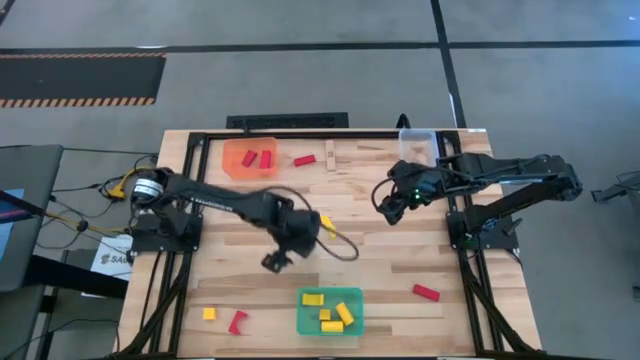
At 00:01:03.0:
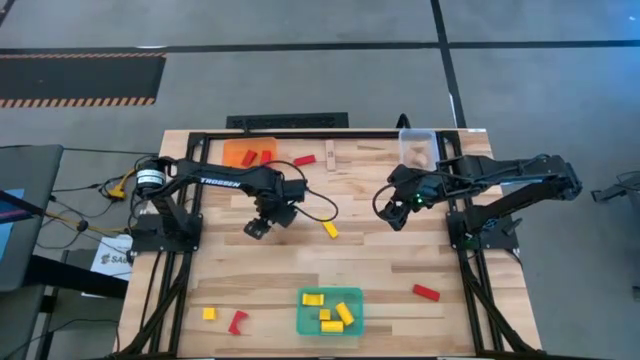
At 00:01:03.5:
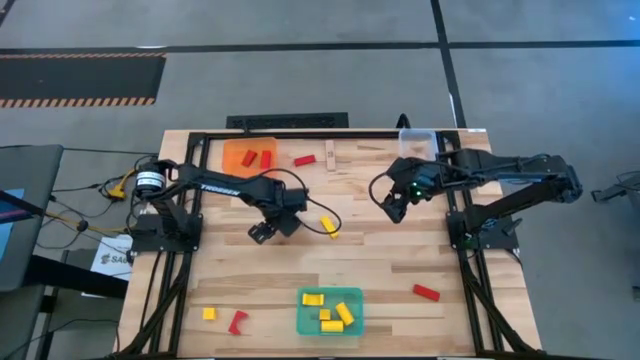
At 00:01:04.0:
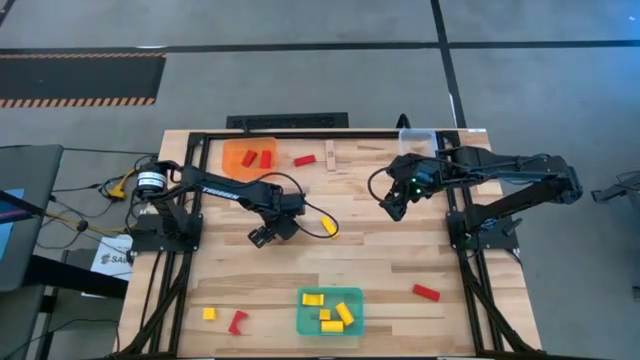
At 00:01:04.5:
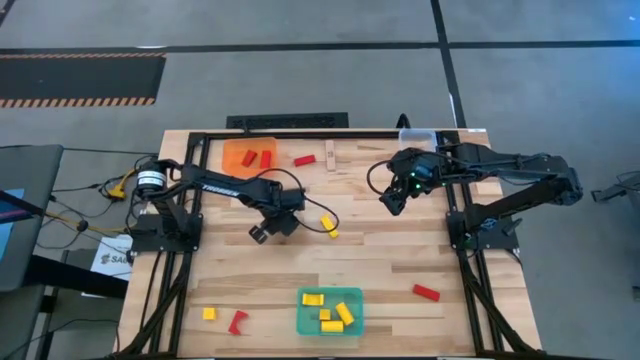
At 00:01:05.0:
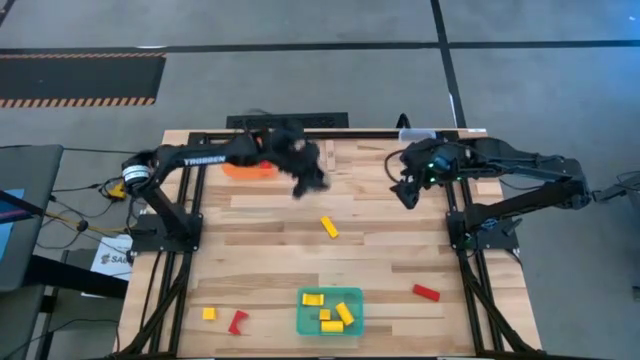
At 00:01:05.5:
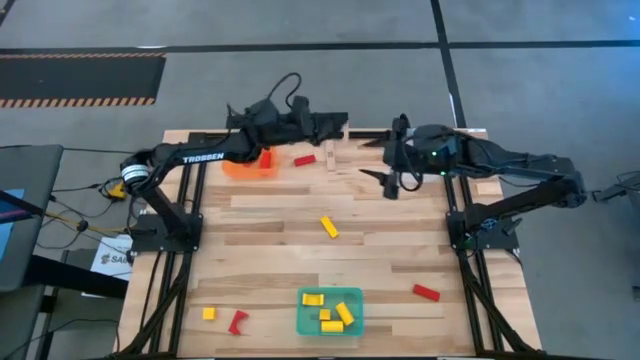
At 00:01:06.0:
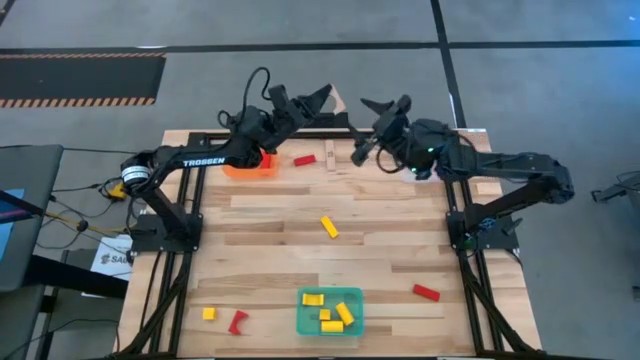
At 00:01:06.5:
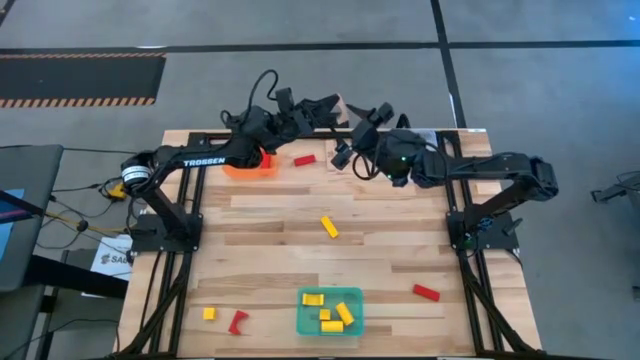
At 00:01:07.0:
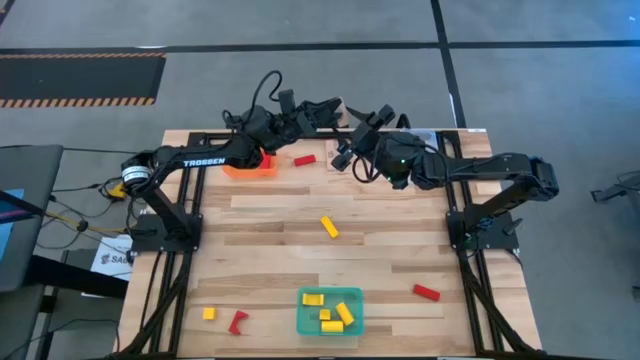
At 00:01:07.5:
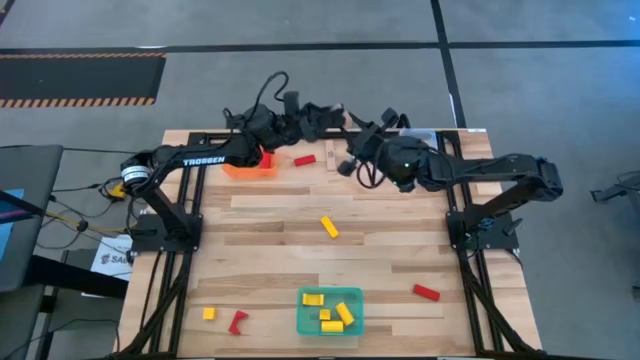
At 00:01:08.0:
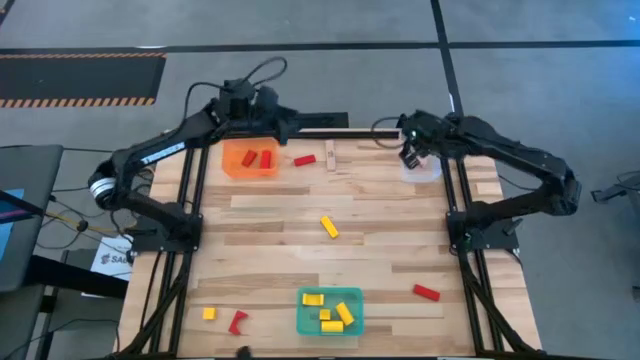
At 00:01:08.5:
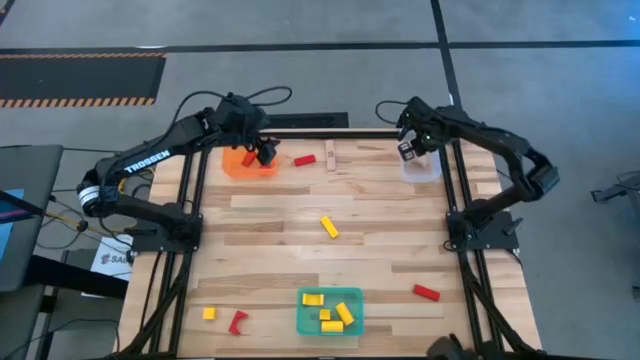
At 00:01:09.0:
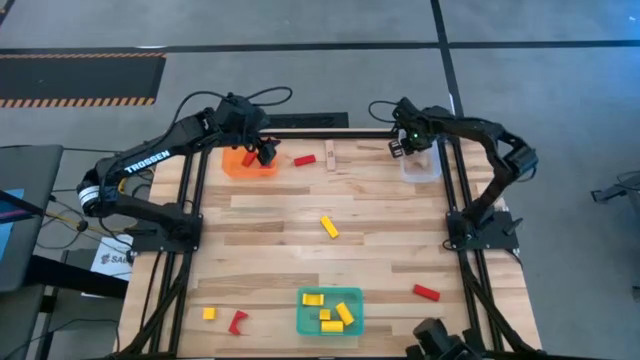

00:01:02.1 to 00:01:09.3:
Task: Sort & place blocks by color
Put the brown block into the transparent bin

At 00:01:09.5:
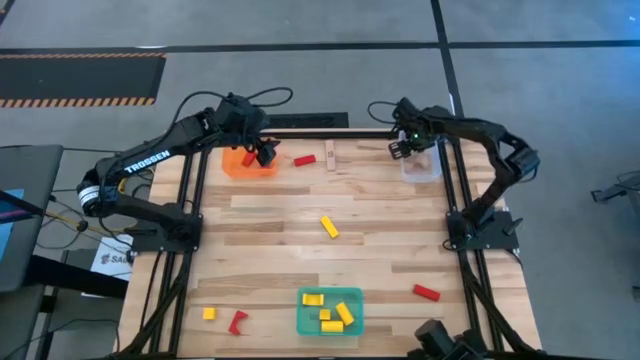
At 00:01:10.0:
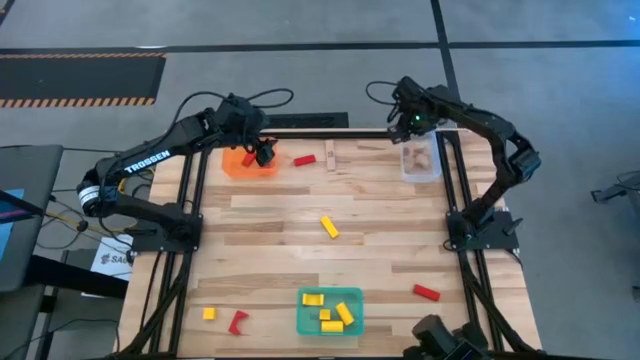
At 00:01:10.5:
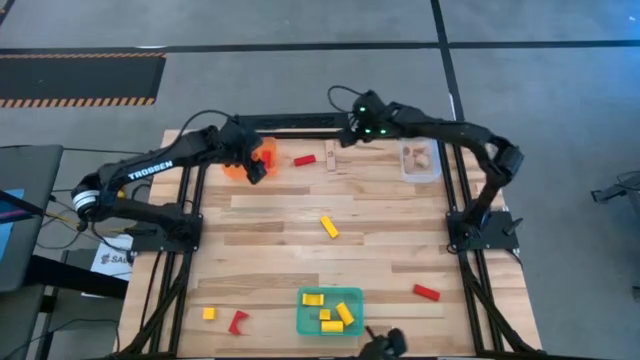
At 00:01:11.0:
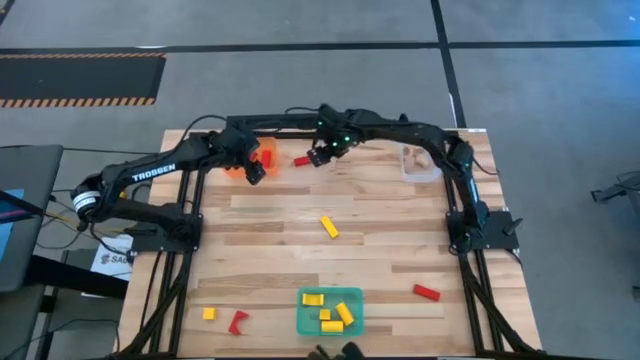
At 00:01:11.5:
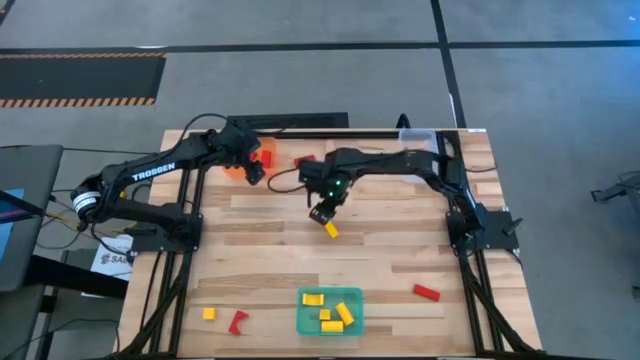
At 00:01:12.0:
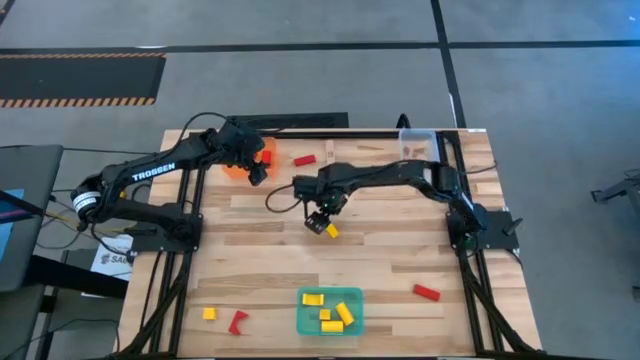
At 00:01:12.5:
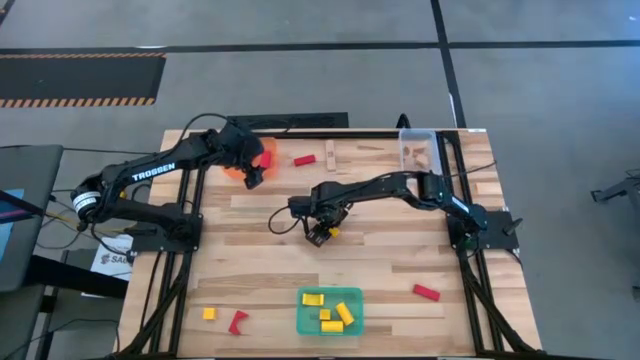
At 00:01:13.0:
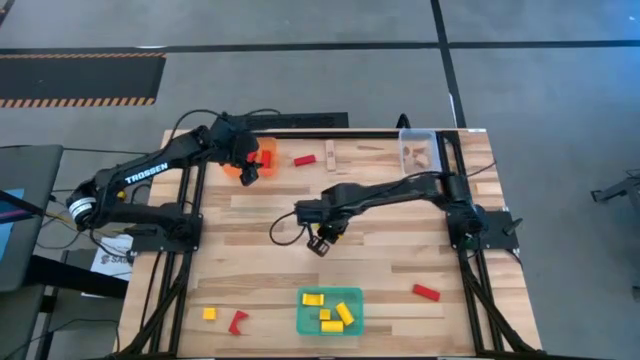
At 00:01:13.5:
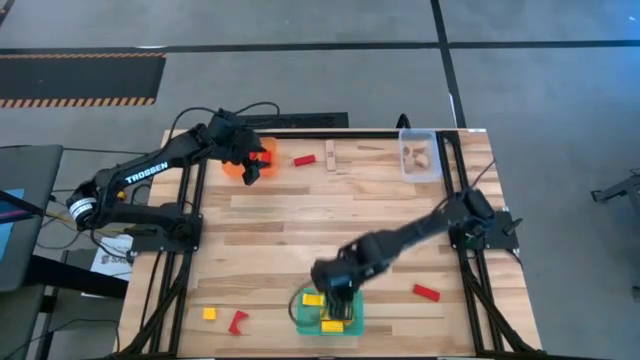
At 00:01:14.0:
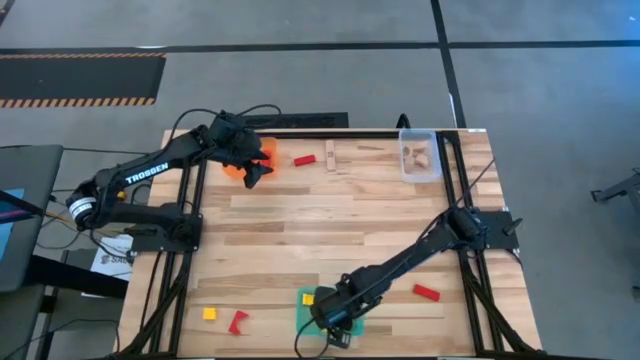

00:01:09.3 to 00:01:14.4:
Put the yellow block into the blue bin

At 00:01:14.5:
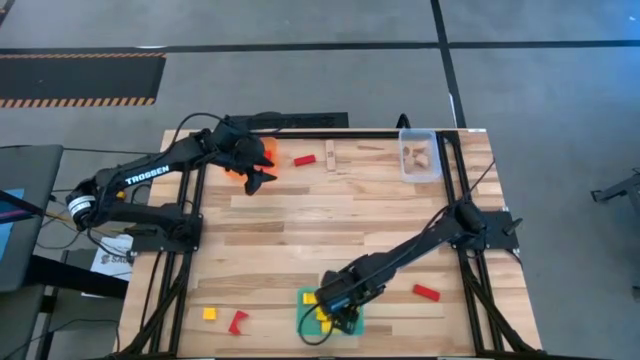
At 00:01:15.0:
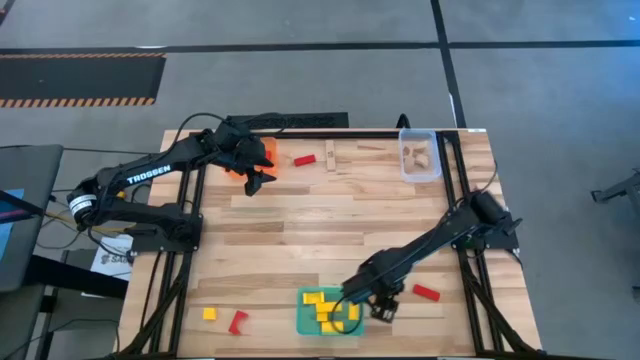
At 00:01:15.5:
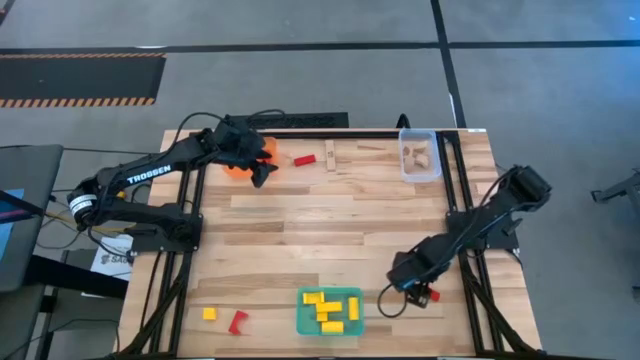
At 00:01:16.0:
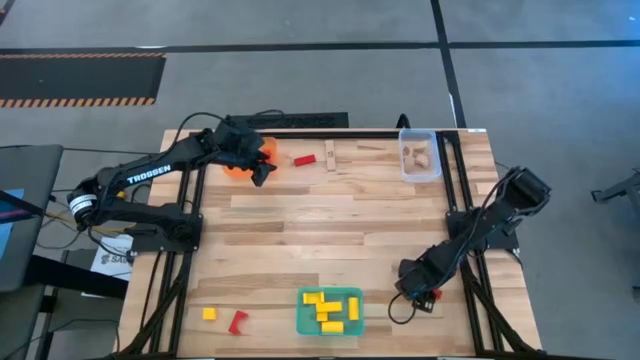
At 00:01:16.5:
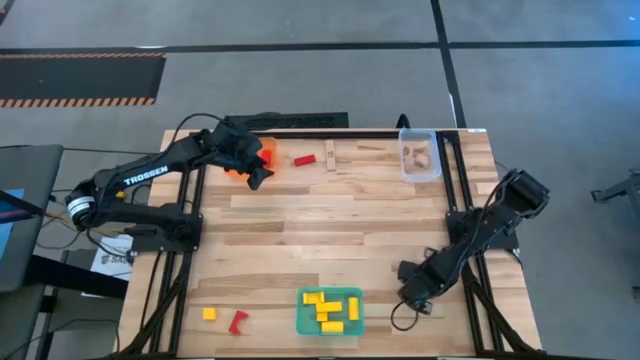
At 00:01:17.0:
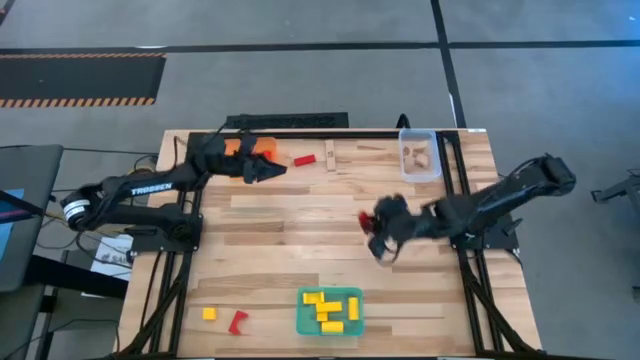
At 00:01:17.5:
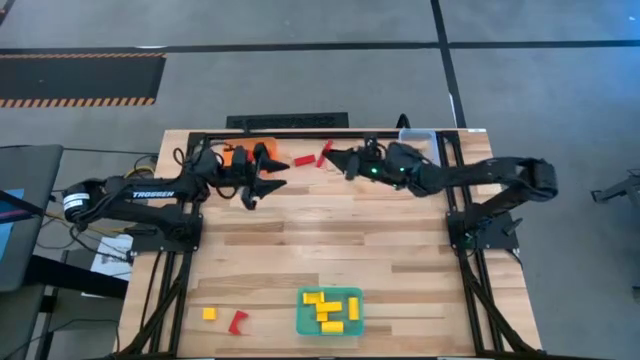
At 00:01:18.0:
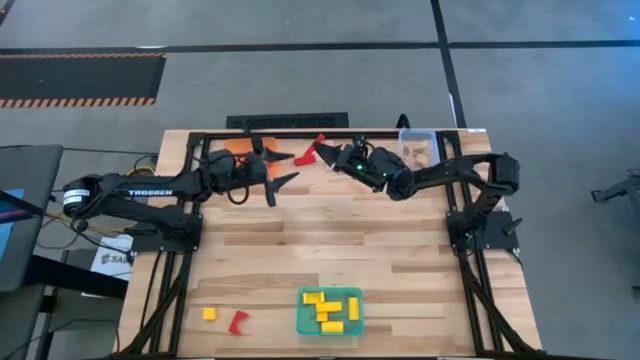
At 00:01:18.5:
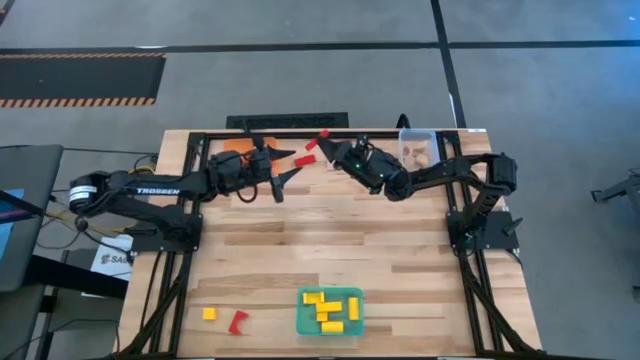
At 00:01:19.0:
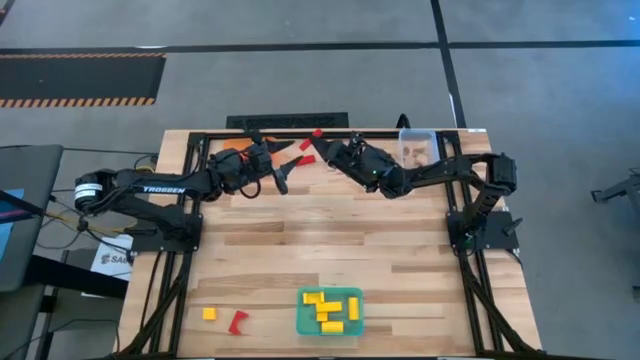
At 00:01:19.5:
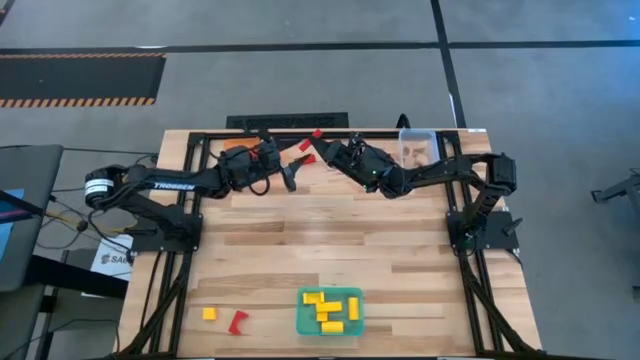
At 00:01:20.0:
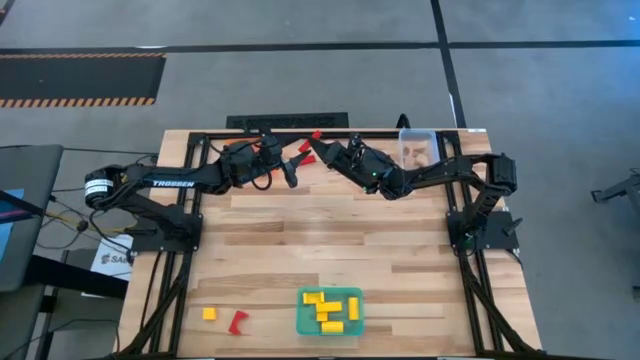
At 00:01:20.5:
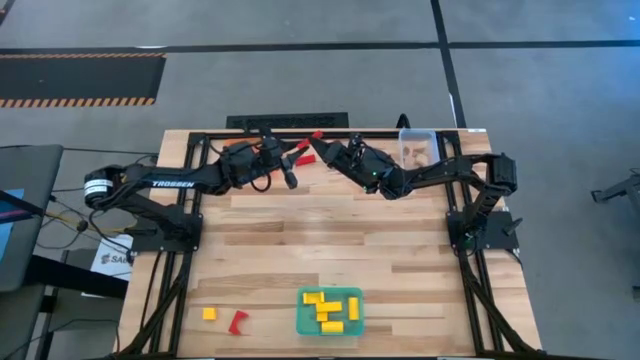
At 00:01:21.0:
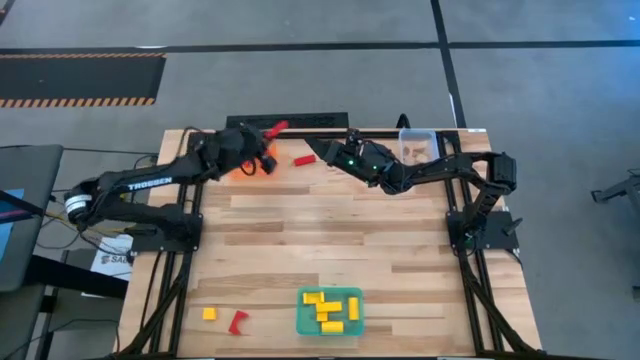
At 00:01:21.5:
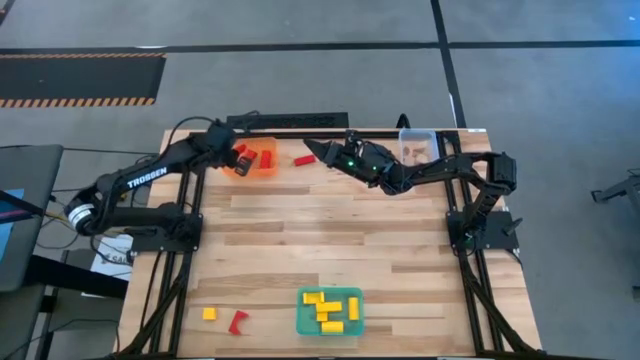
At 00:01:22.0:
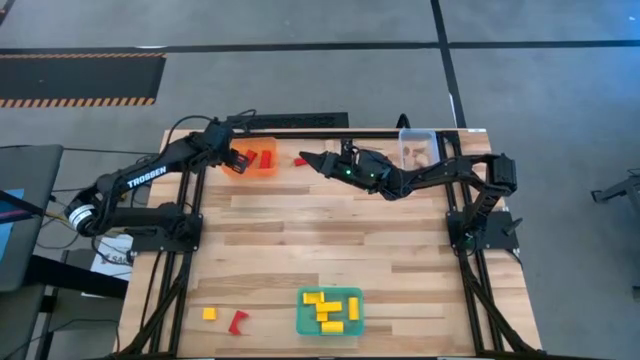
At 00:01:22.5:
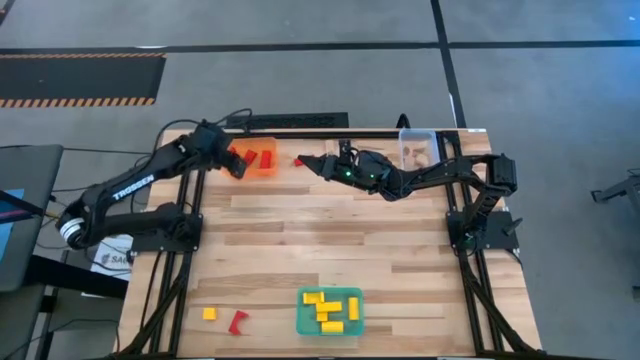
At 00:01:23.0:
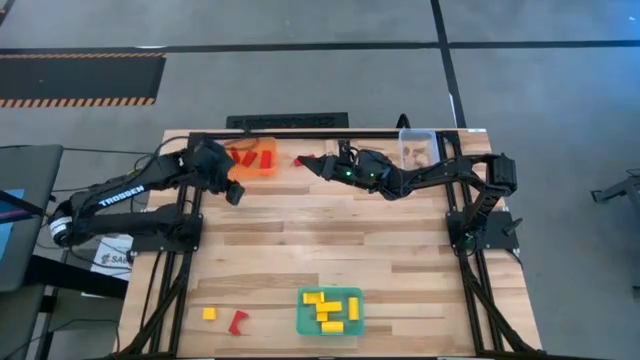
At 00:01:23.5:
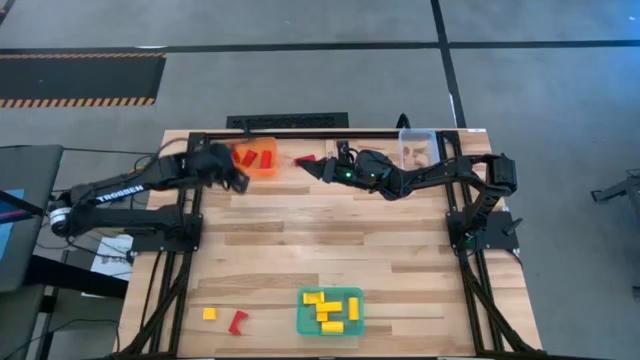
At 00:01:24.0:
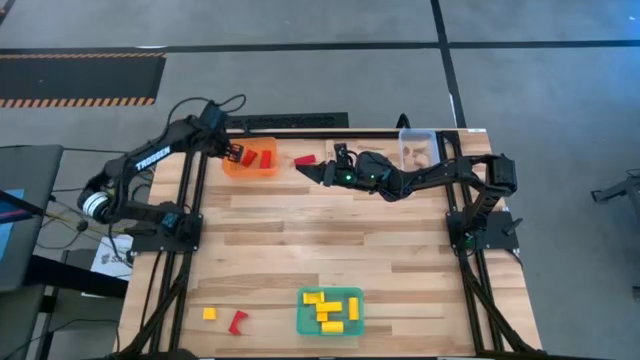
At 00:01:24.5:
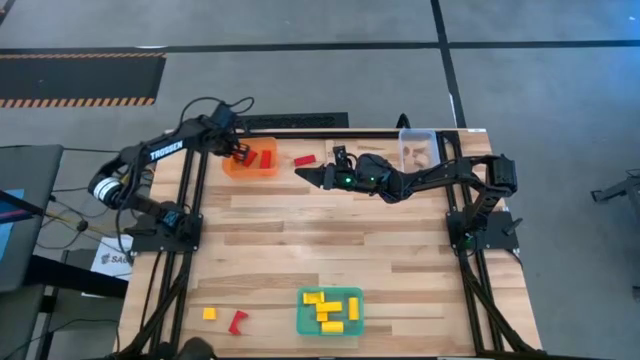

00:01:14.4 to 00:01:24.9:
Put the red block into the orange bin
